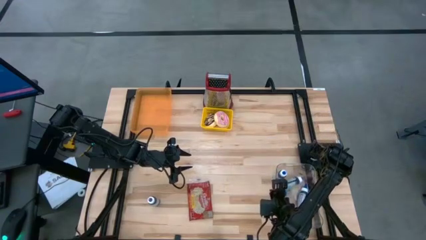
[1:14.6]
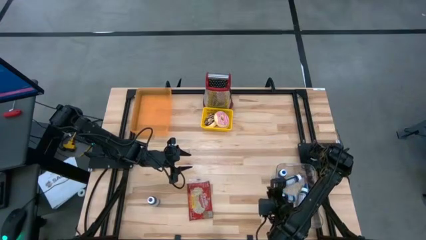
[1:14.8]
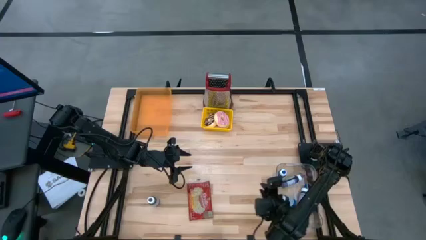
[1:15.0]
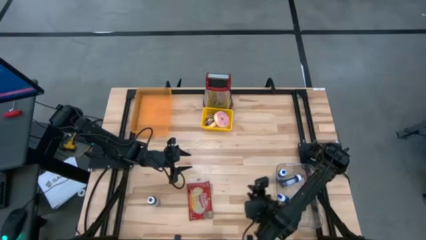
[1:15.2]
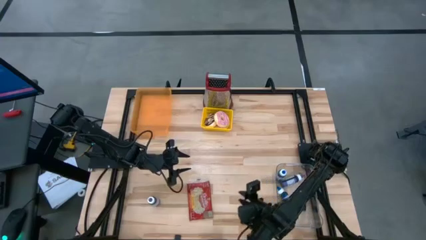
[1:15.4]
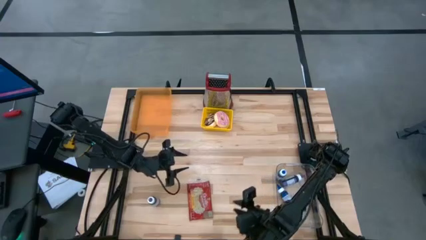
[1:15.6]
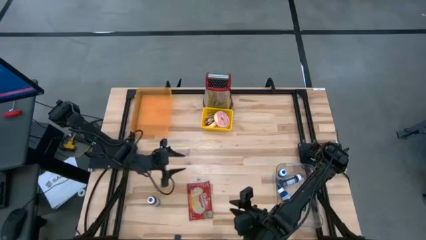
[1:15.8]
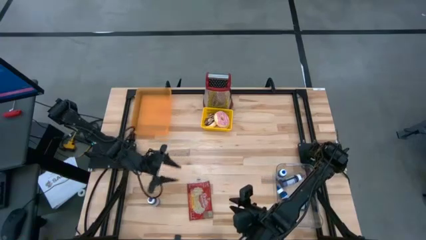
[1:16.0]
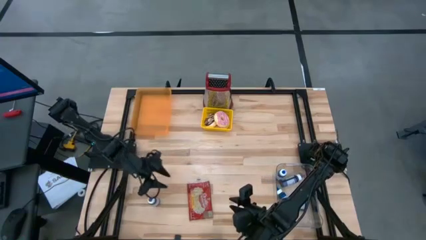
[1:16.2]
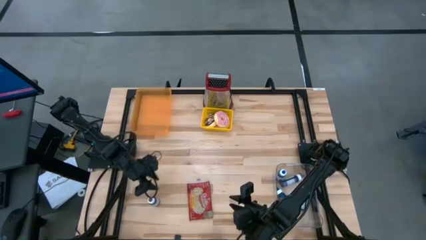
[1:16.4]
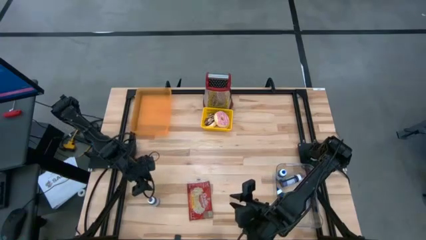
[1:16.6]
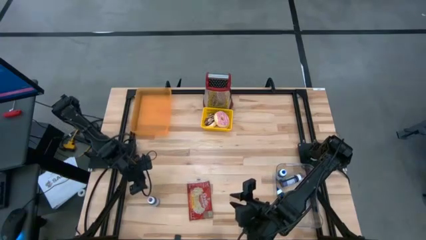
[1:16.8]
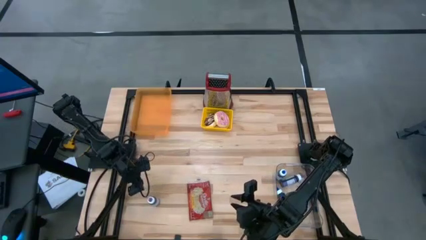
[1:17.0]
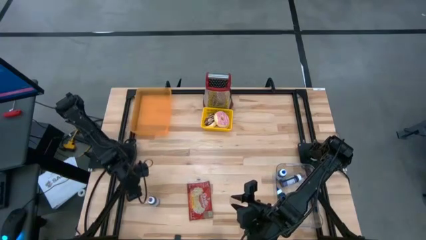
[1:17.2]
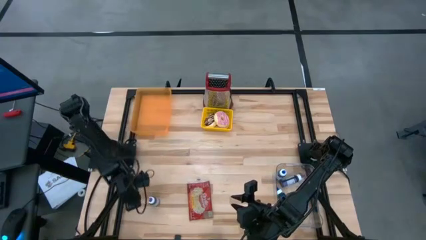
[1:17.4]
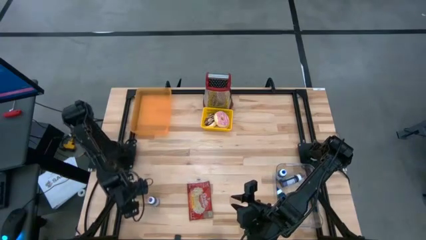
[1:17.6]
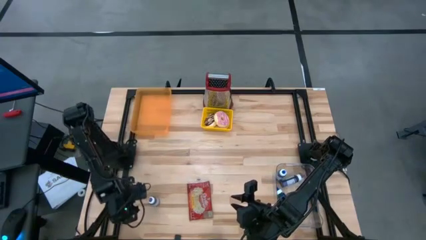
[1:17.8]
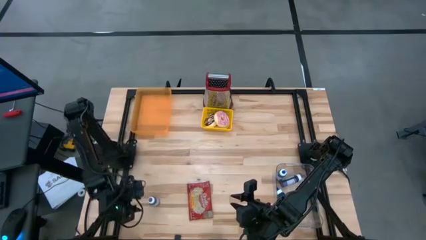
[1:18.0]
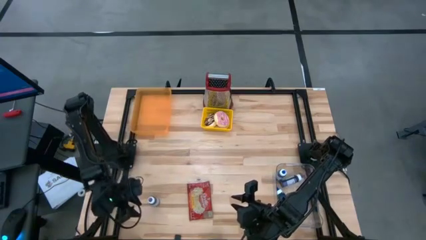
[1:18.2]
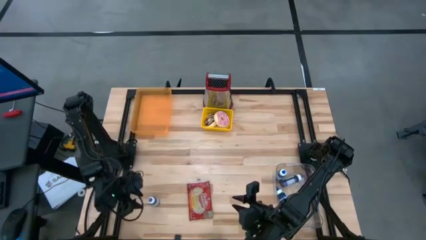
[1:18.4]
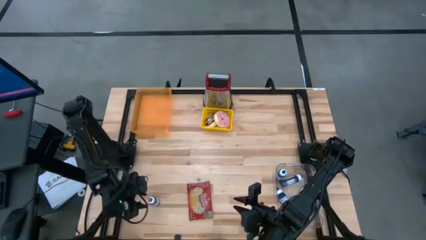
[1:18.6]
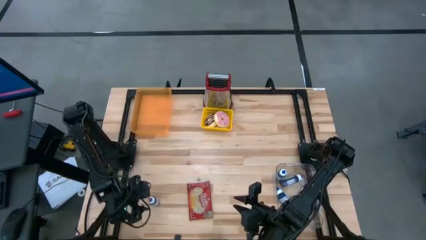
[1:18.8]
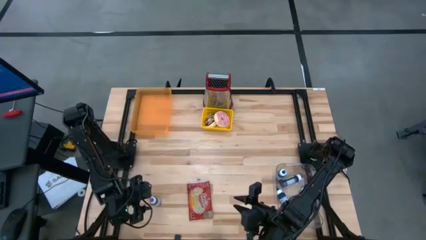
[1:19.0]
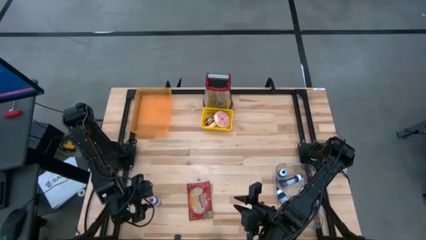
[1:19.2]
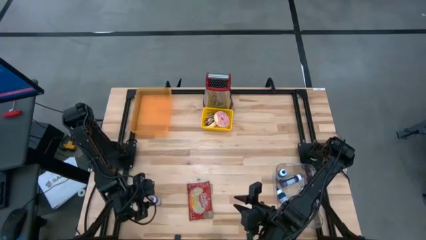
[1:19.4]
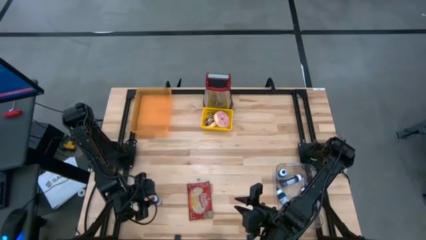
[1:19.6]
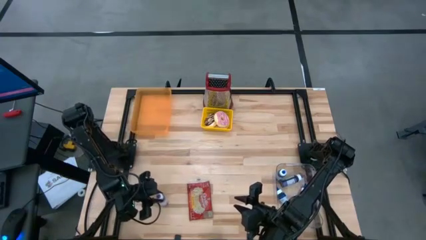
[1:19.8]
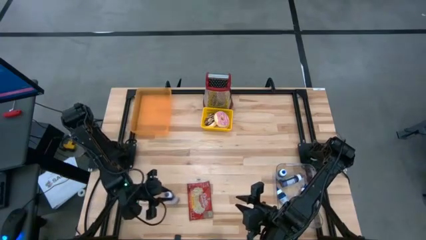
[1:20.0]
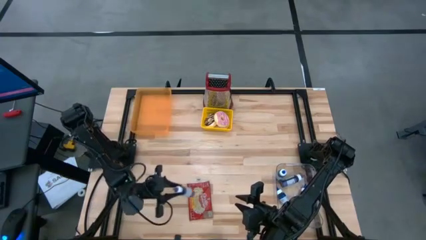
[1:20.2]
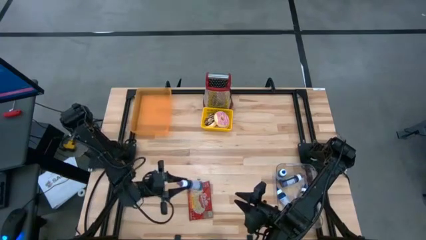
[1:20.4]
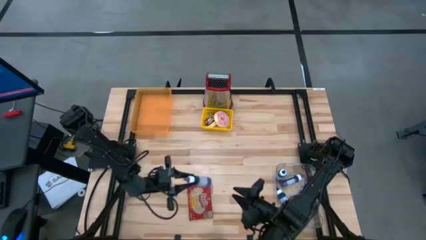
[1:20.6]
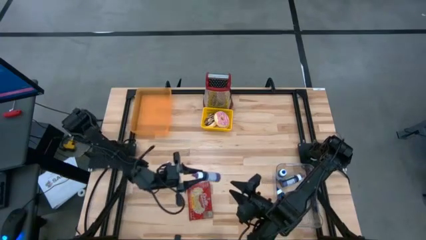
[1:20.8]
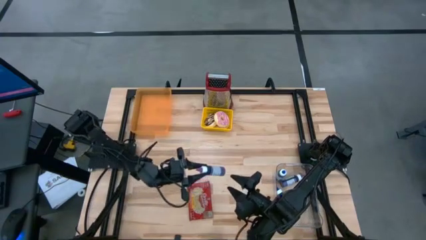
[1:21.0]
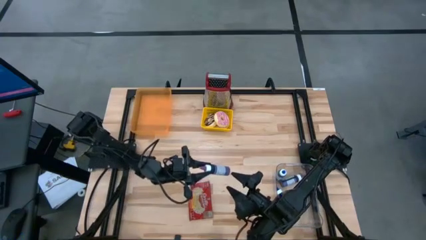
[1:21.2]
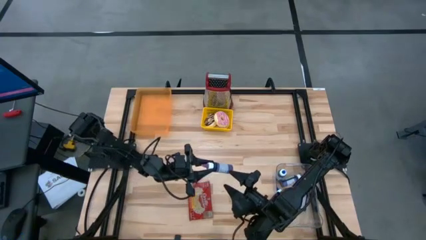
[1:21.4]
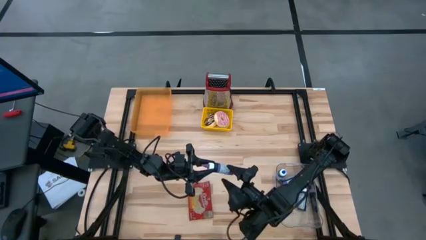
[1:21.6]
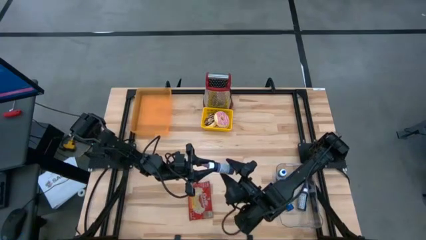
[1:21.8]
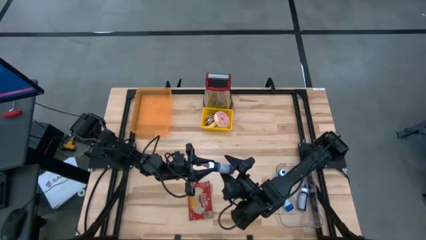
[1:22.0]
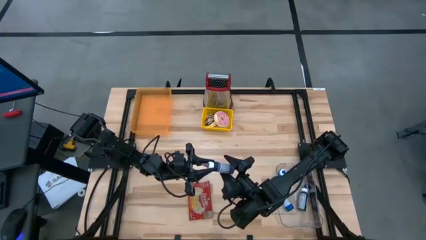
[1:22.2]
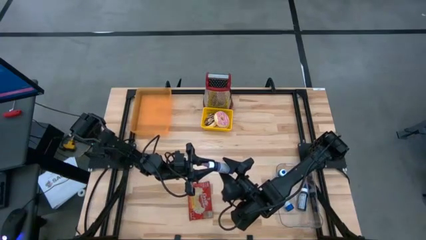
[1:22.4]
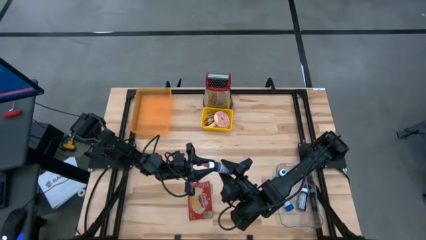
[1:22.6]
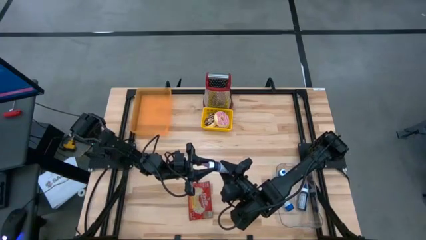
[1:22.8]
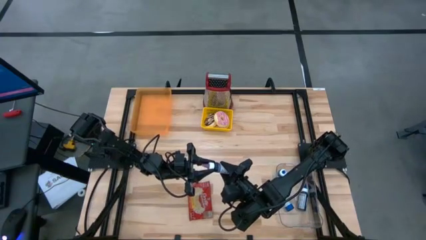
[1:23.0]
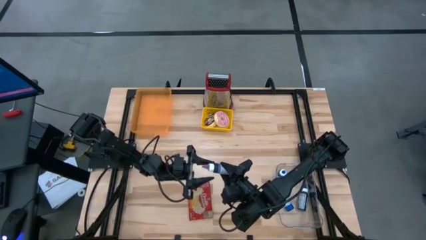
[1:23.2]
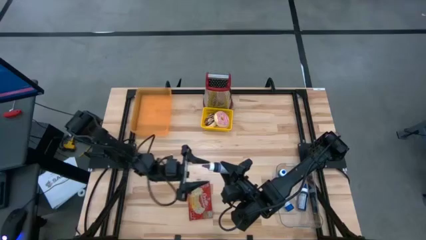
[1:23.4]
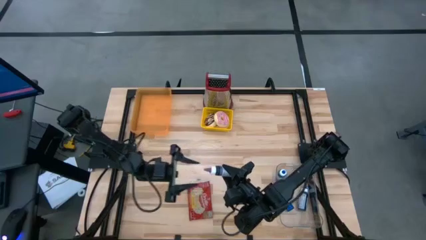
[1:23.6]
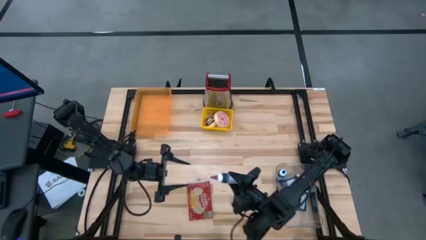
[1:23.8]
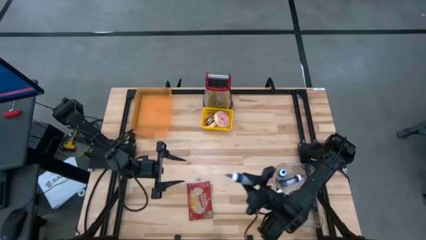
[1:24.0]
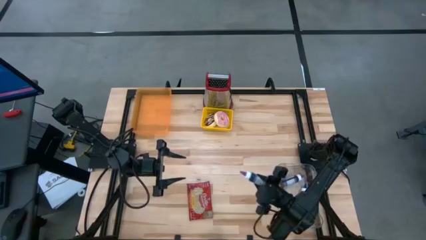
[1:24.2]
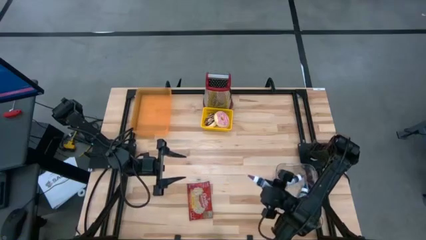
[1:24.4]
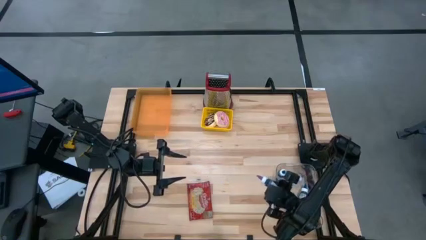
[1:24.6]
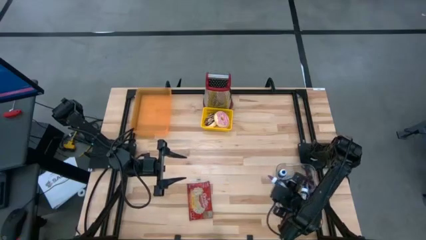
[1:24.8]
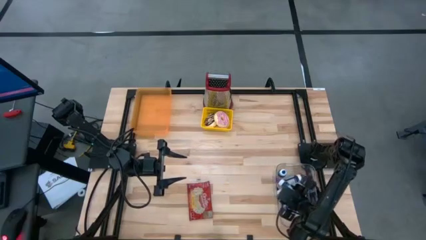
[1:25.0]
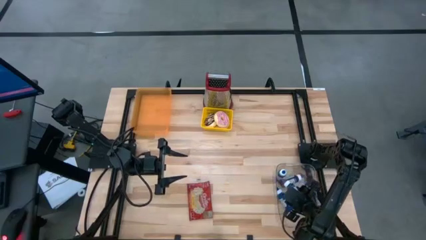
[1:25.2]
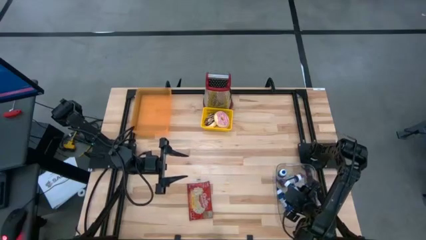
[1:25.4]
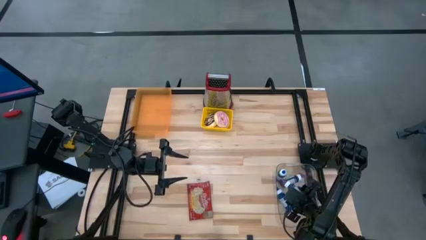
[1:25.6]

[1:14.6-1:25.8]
Put the violet food coloring bottle into the transparent bin
